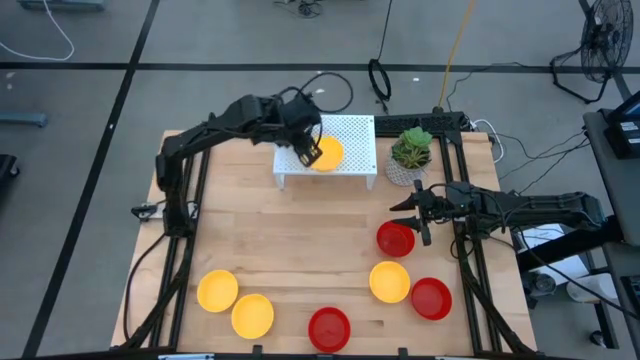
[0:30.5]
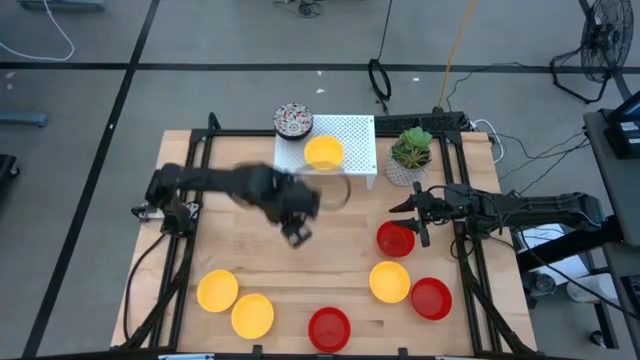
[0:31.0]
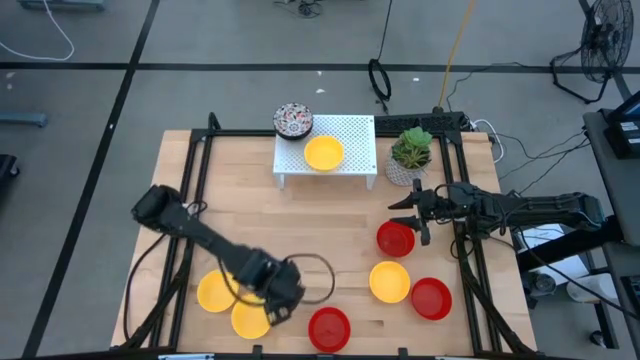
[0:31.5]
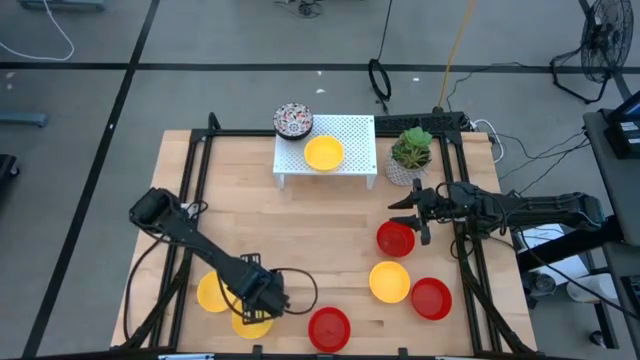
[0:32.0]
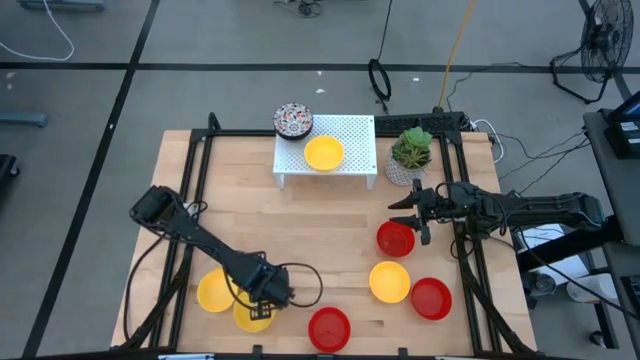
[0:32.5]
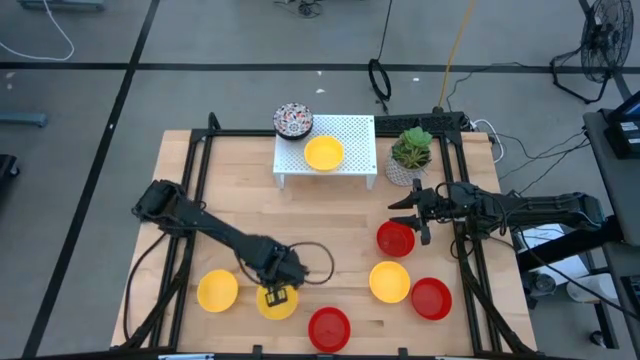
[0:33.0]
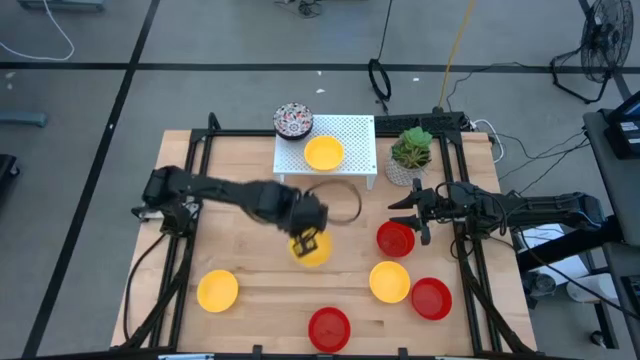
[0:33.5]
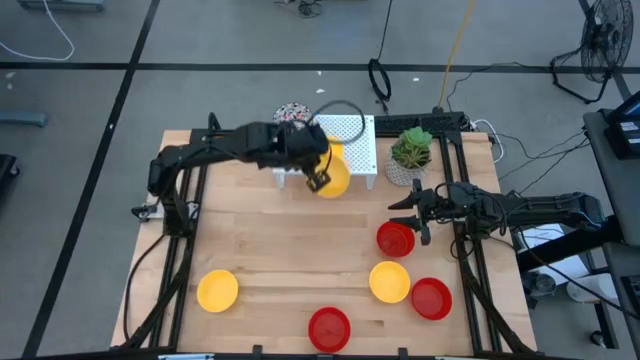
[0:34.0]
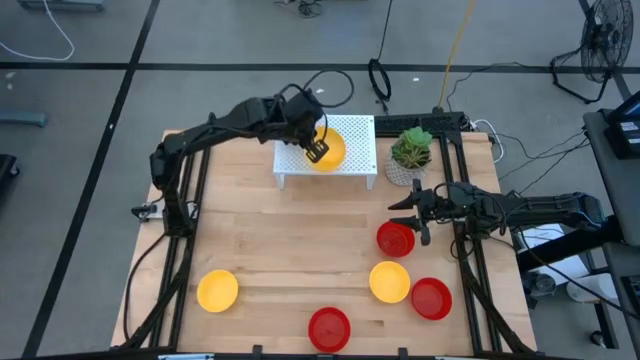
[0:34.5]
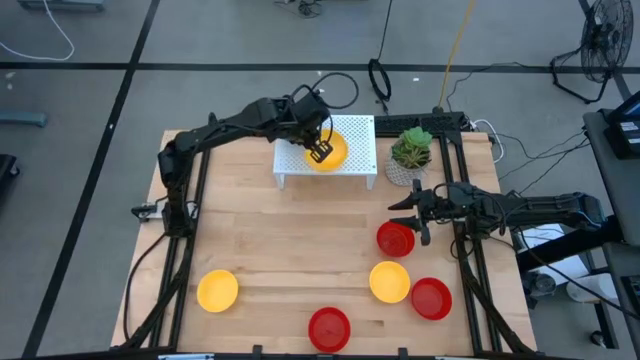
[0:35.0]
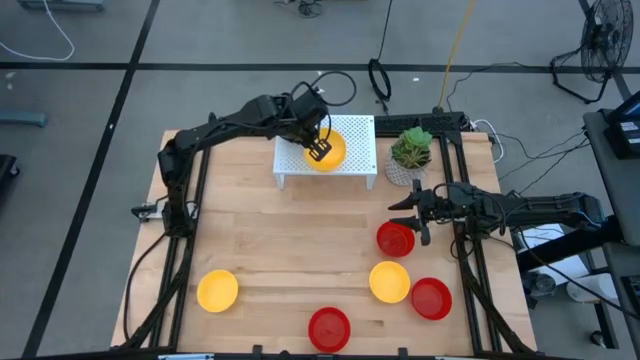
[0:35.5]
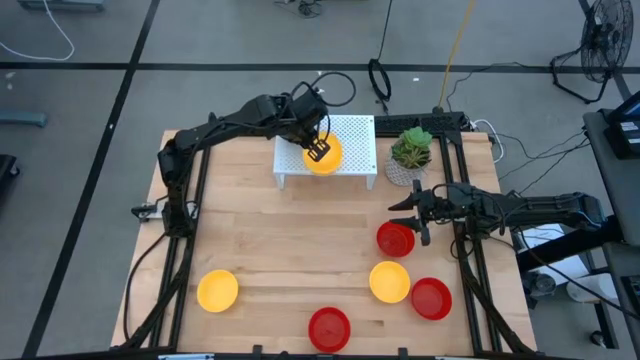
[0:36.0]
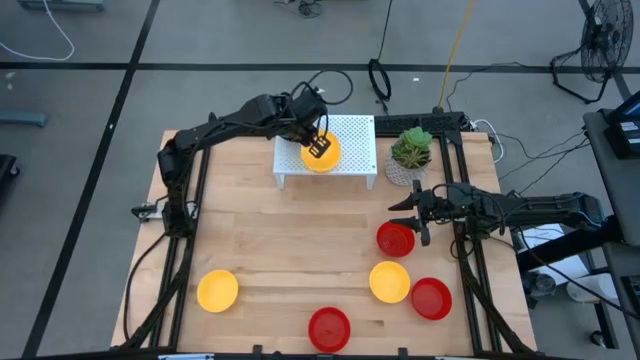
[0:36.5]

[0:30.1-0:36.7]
Task: Pick & Place Mini bowls
Stack the yellow bowl on the yellow bowl on the shelf

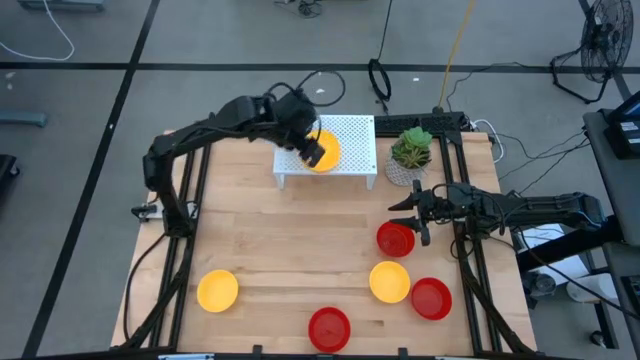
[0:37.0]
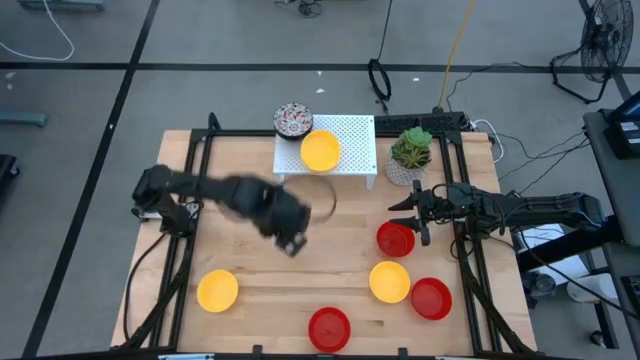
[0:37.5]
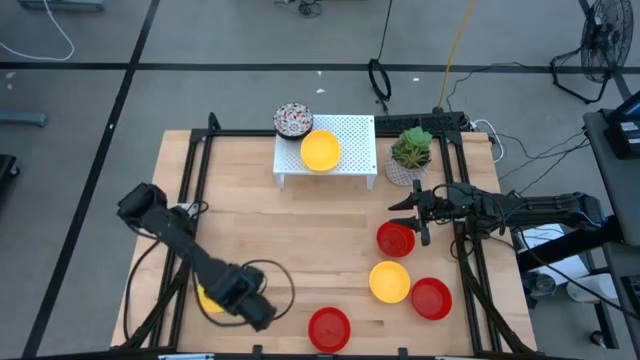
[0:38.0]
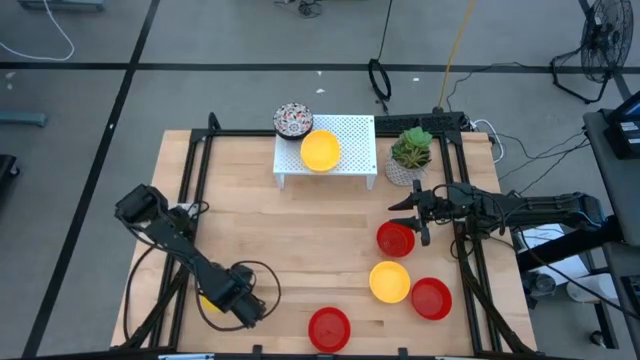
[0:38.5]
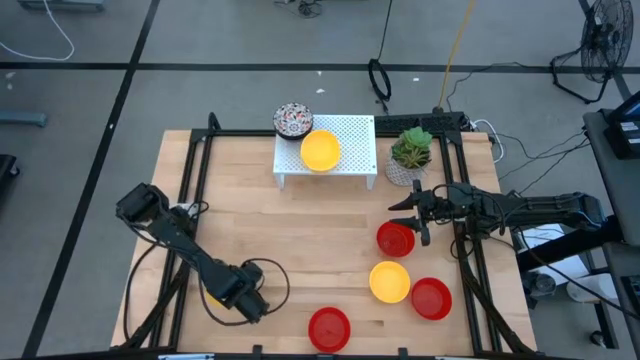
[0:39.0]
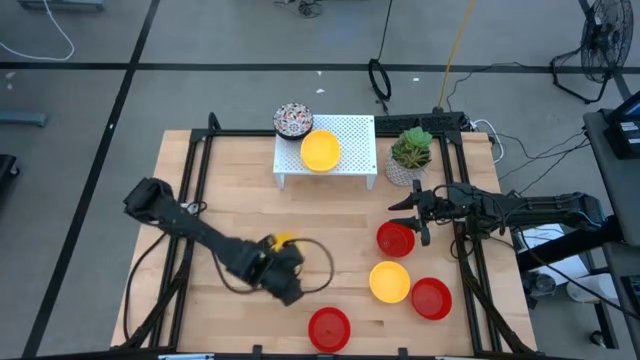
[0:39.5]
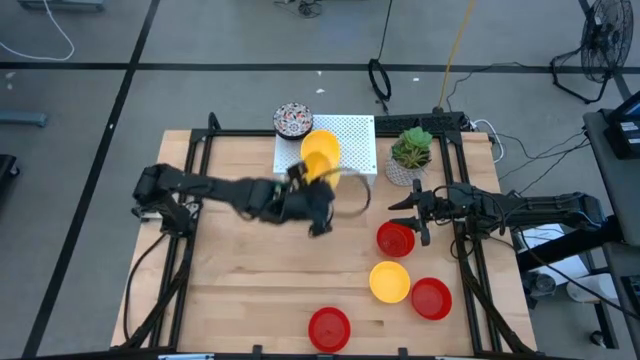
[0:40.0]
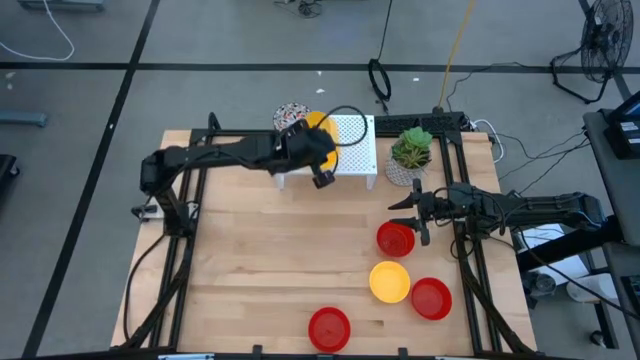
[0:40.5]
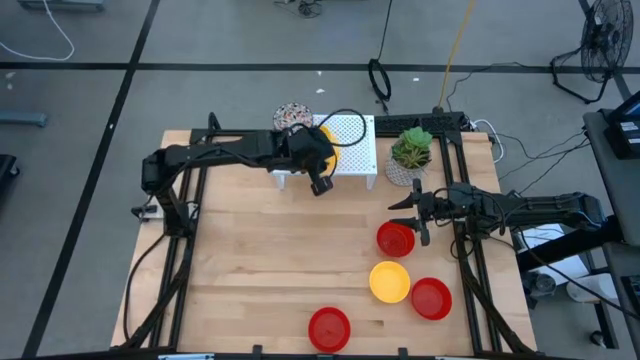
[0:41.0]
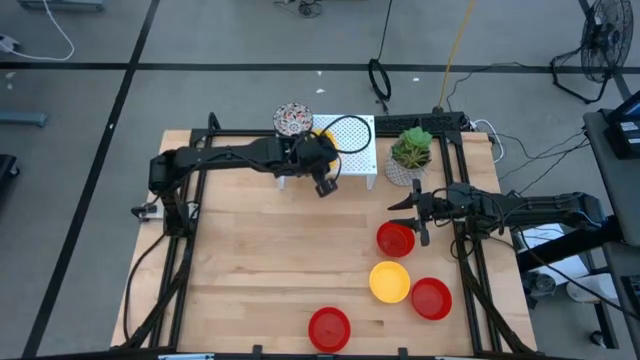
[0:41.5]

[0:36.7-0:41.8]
Stack the yellow bowl on the yellow bowl on the shelf

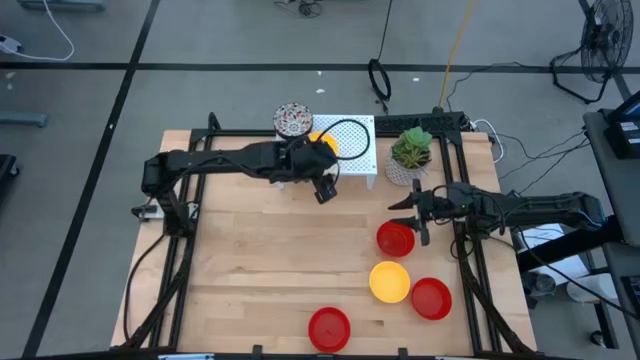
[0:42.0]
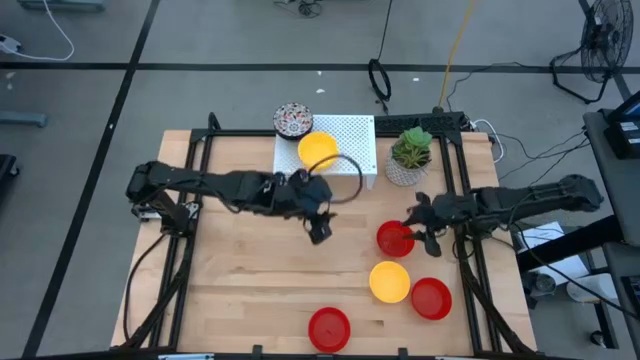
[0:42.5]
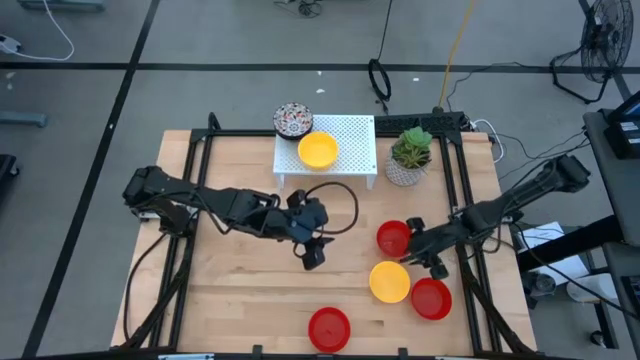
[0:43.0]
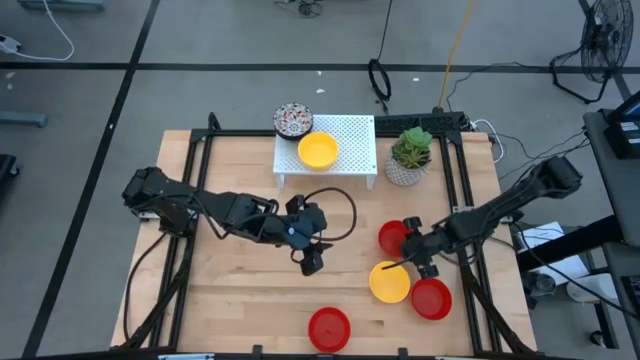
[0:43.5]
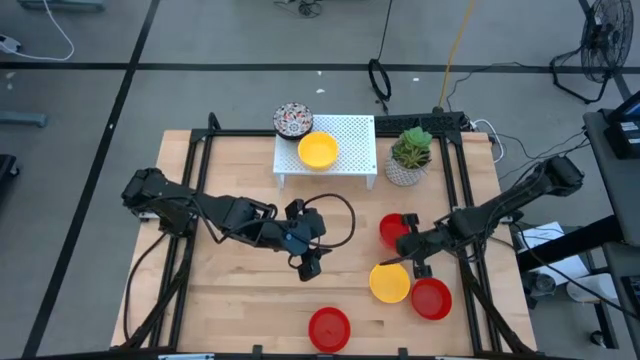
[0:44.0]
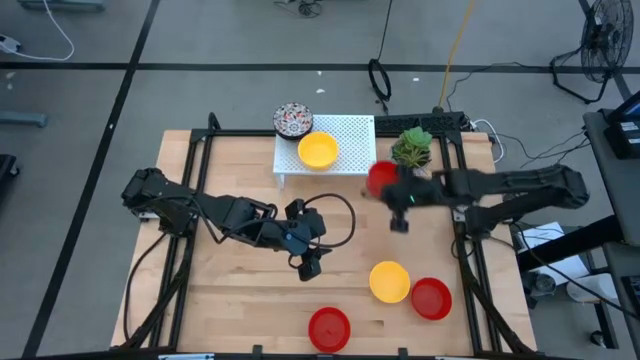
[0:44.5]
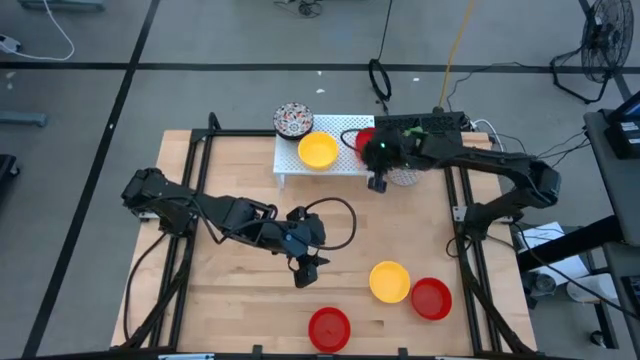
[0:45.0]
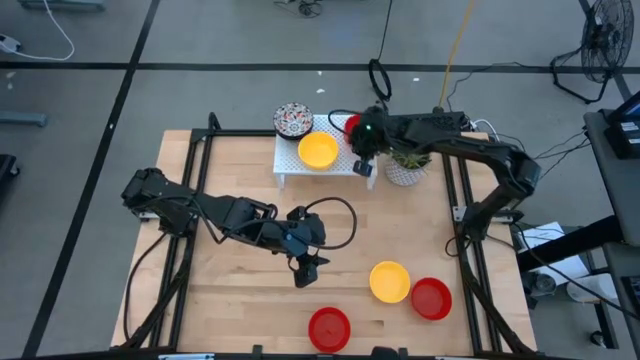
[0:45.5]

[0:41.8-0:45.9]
Put the red bowl on the shelf

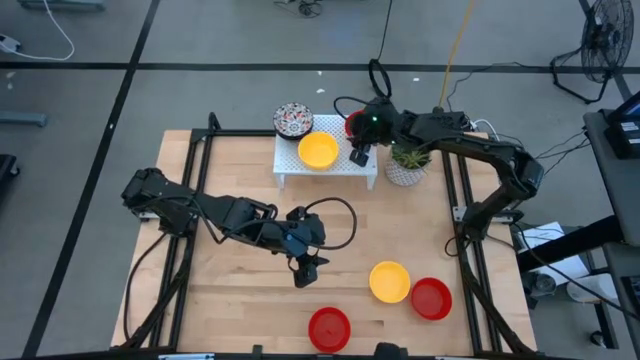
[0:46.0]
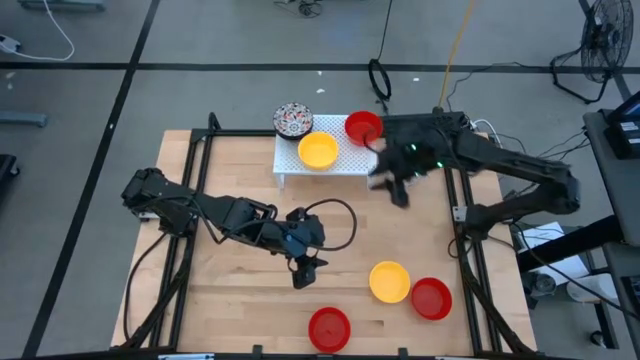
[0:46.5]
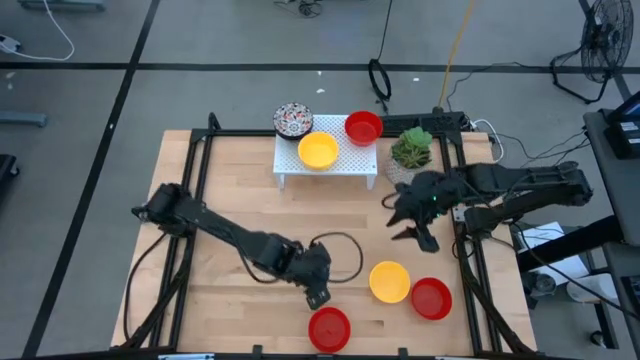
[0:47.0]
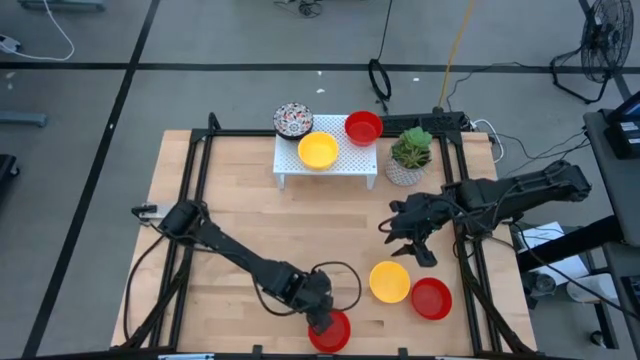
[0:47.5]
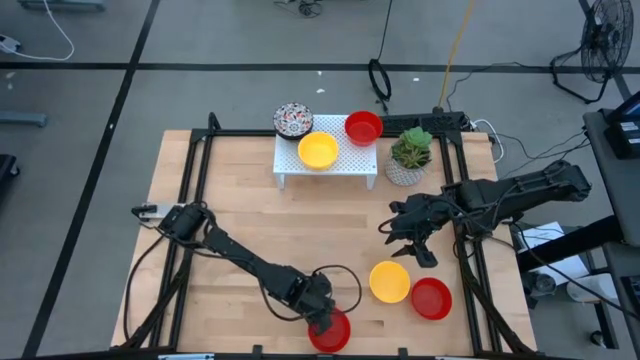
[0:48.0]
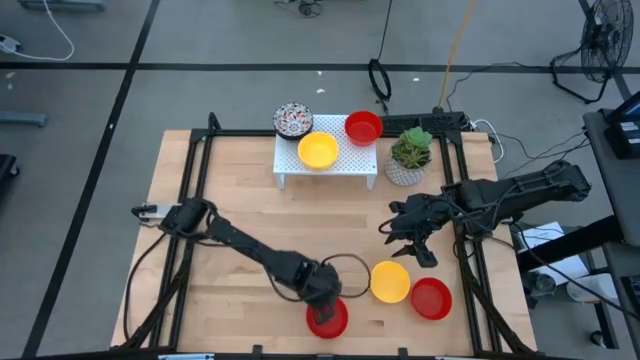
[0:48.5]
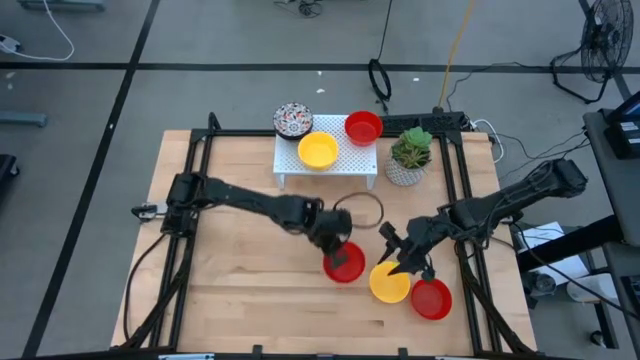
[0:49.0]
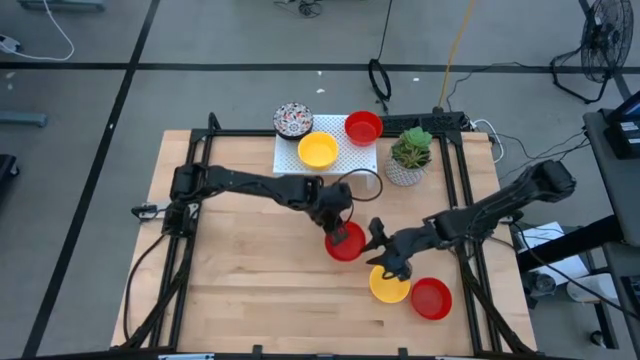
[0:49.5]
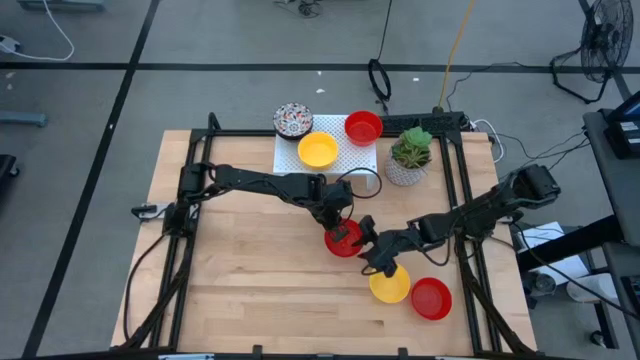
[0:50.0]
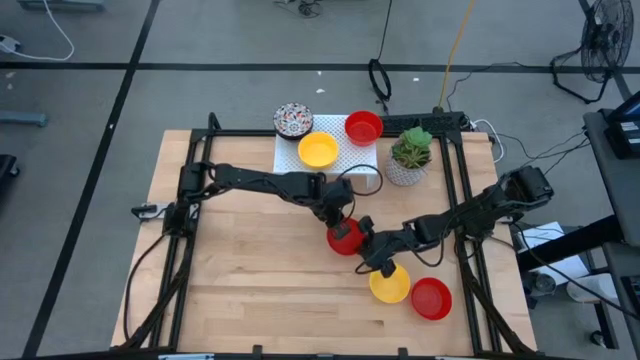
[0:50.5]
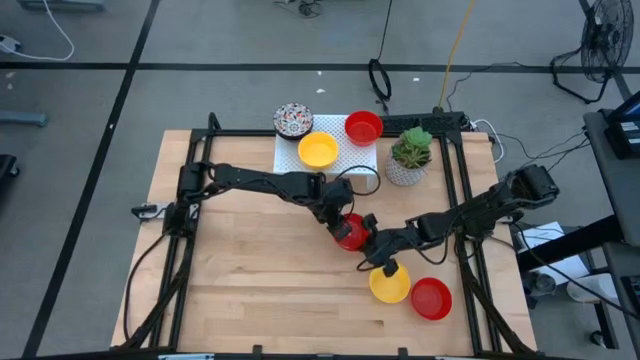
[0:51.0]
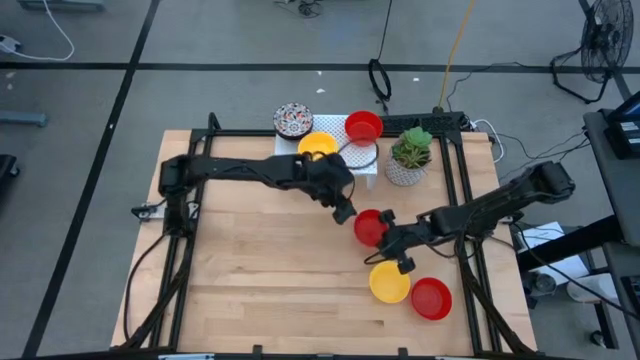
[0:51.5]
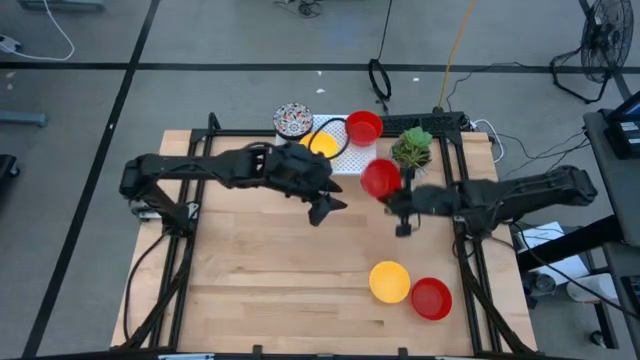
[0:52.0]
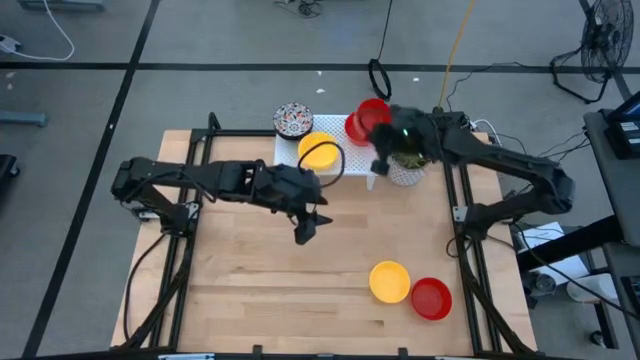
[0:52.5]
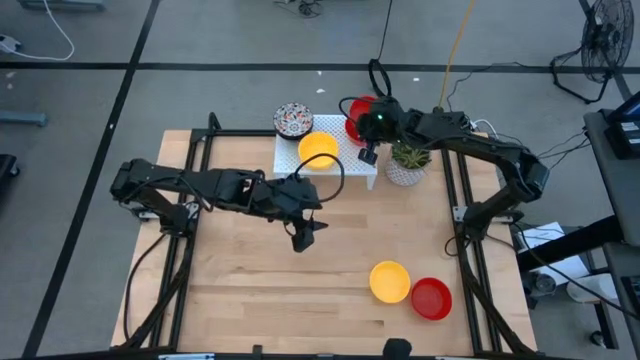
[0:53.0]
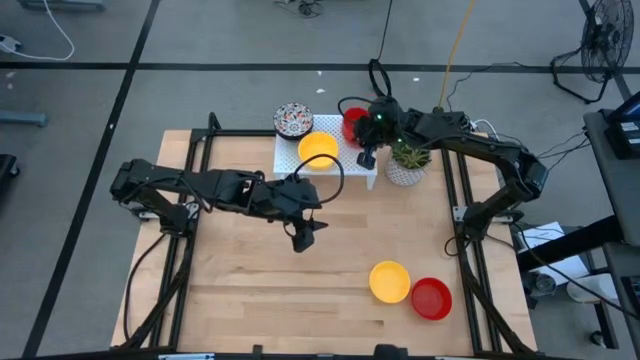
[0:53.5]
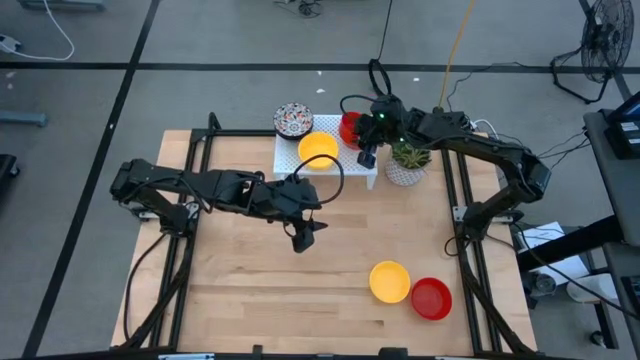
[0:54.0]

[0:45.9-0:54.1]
Stack the red bowl on the red bowl on the shelf
